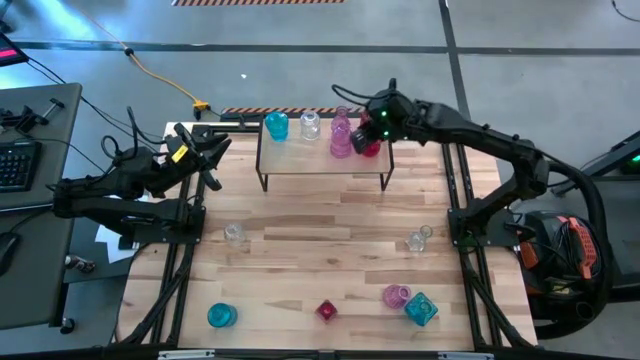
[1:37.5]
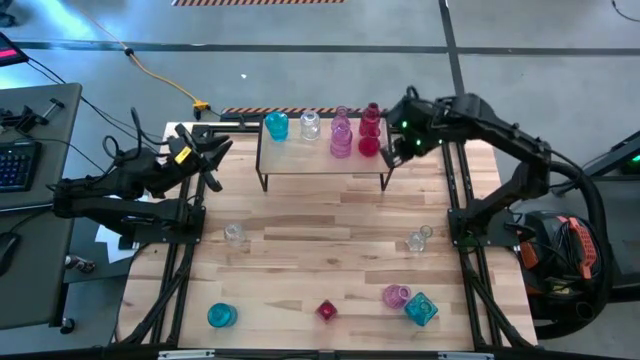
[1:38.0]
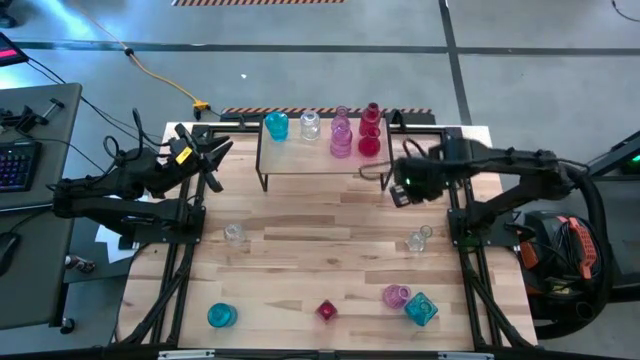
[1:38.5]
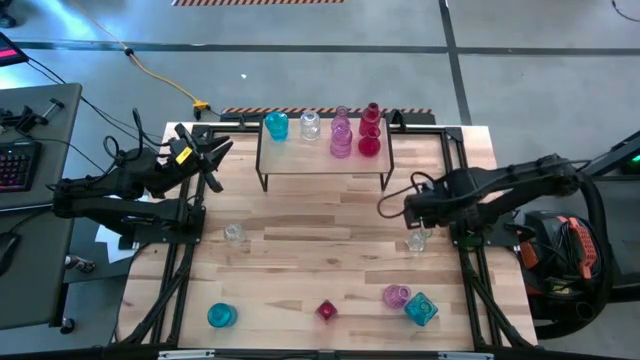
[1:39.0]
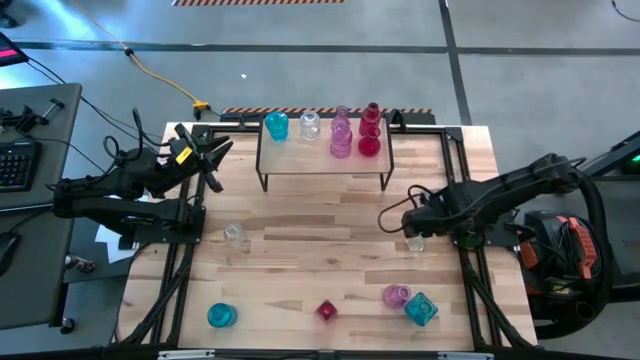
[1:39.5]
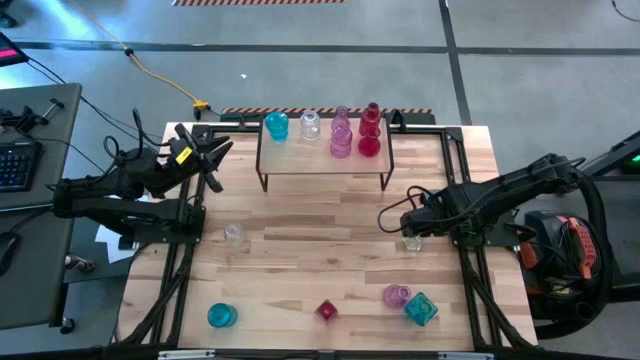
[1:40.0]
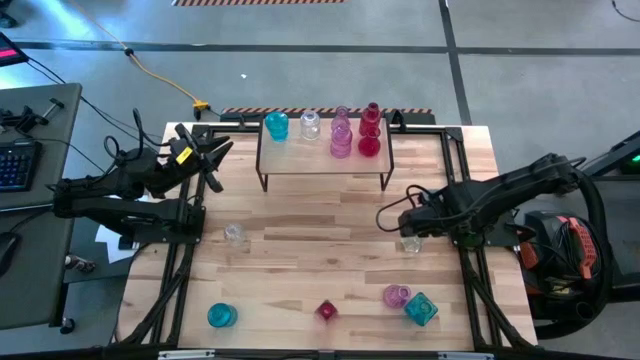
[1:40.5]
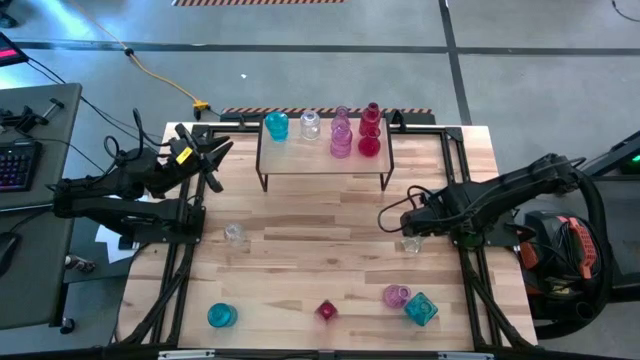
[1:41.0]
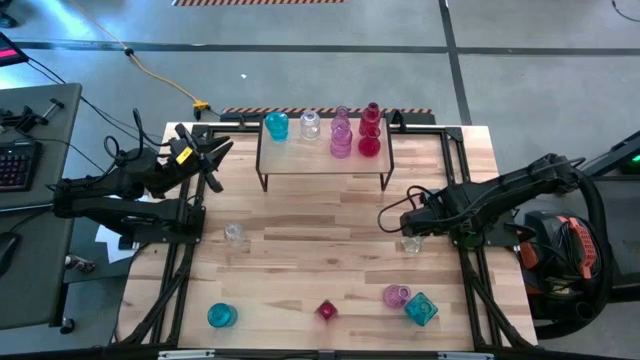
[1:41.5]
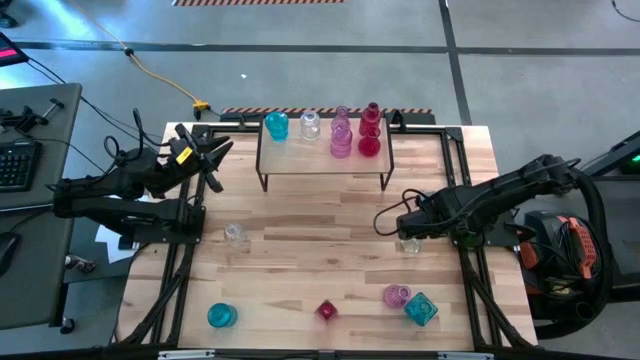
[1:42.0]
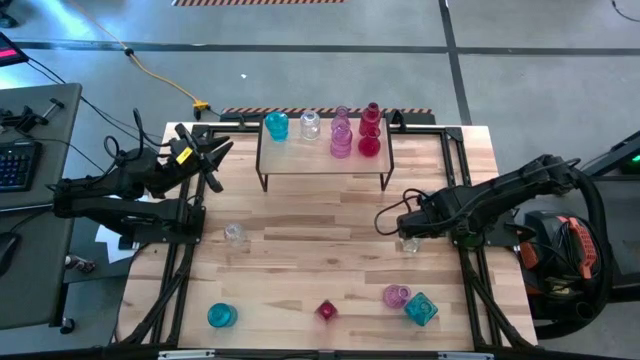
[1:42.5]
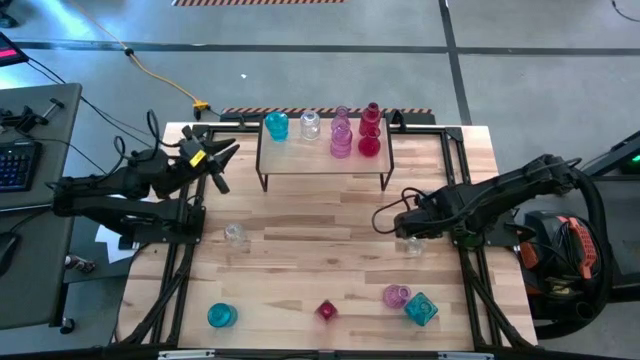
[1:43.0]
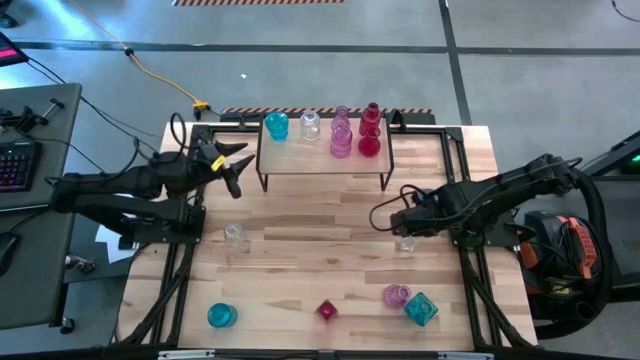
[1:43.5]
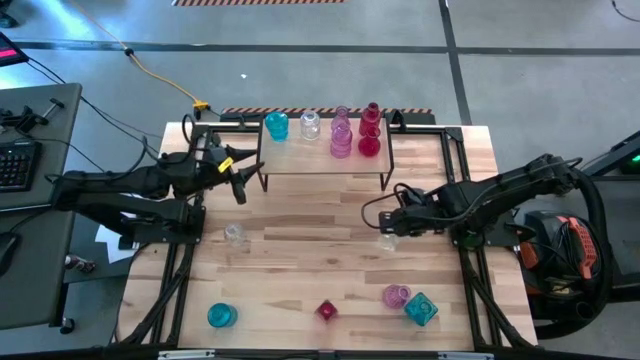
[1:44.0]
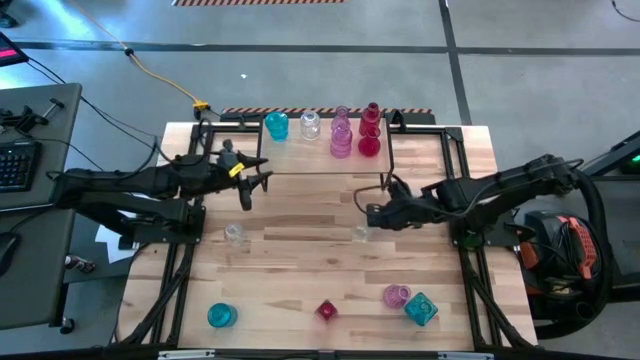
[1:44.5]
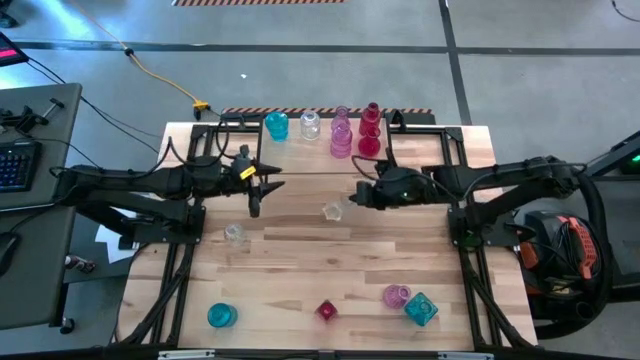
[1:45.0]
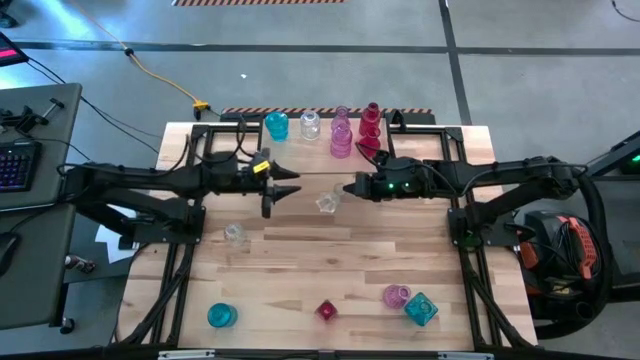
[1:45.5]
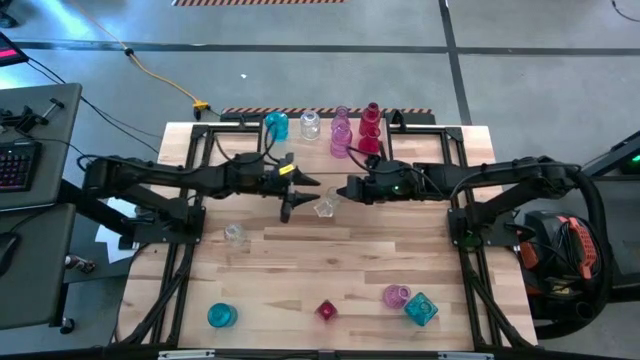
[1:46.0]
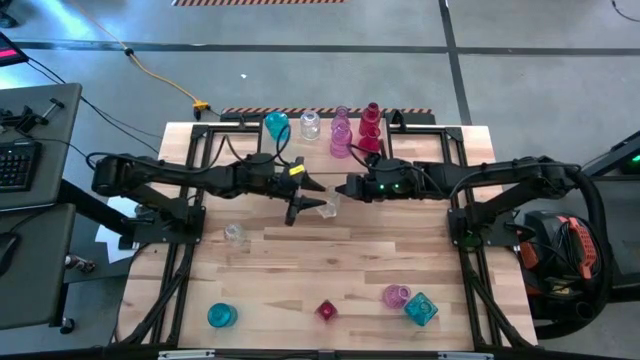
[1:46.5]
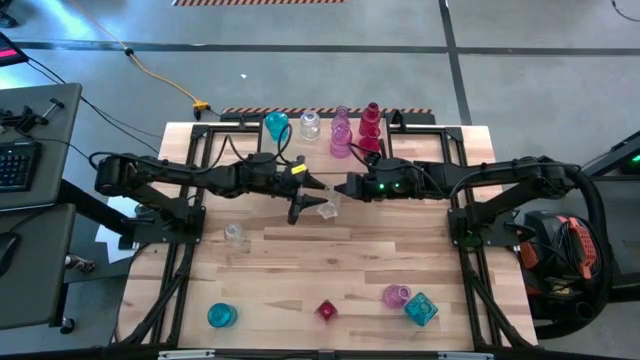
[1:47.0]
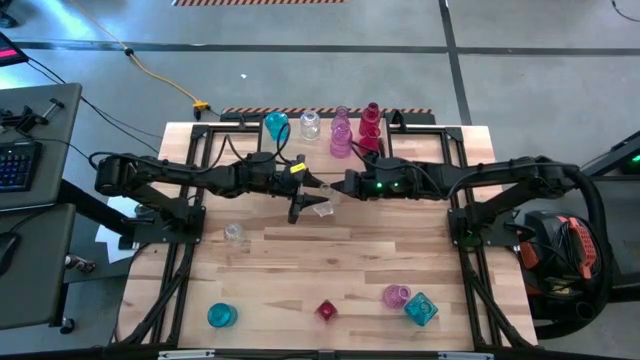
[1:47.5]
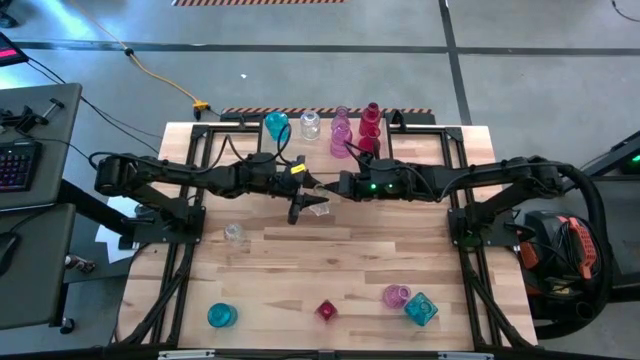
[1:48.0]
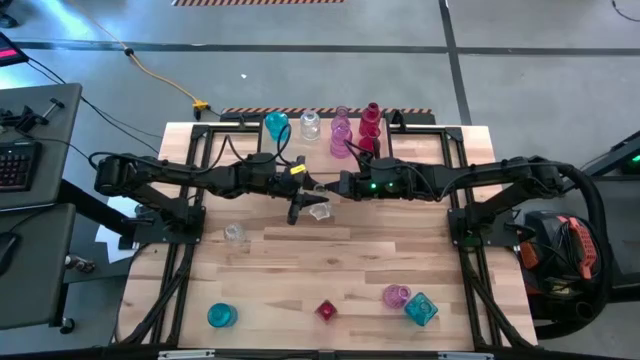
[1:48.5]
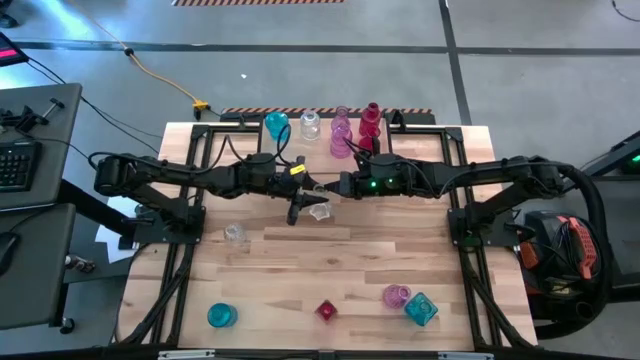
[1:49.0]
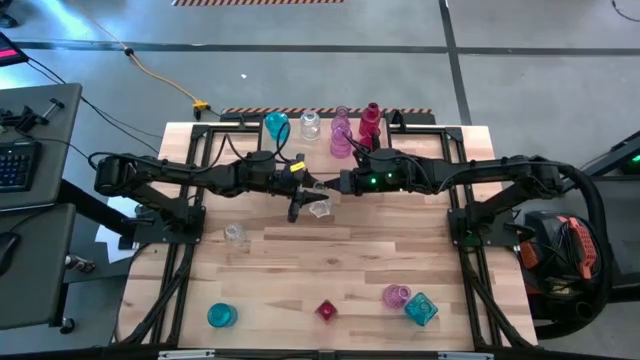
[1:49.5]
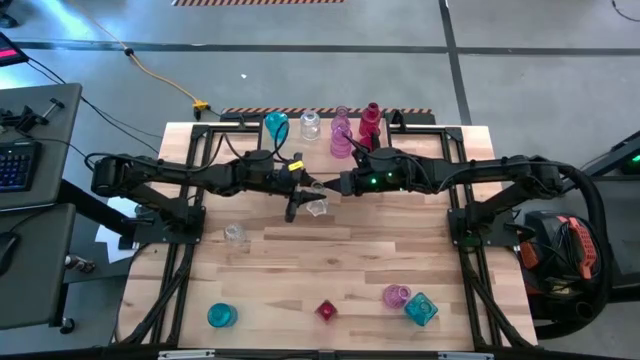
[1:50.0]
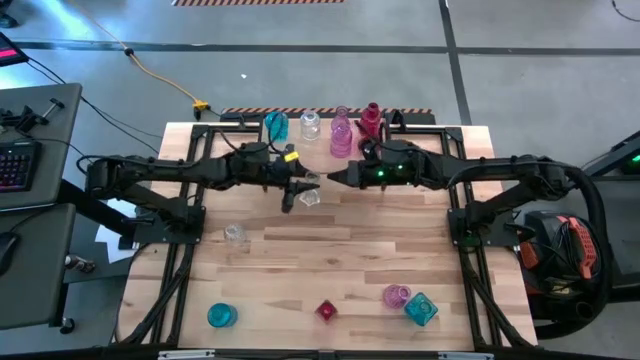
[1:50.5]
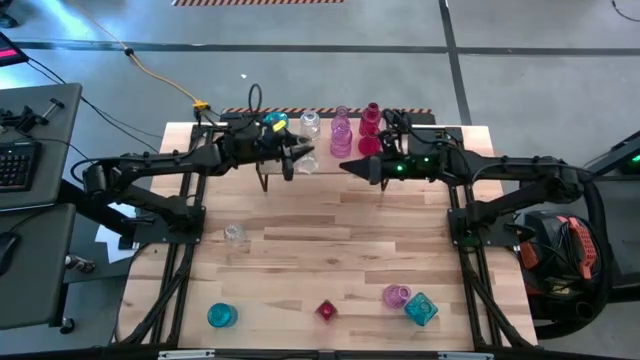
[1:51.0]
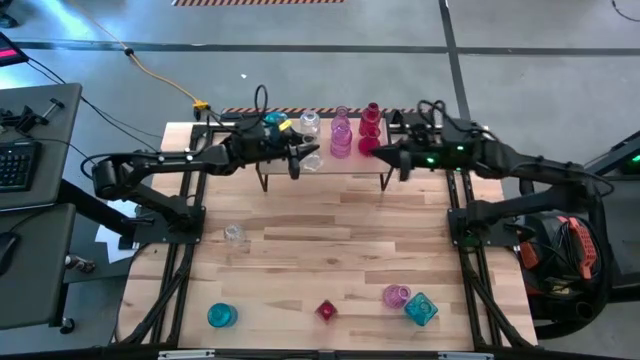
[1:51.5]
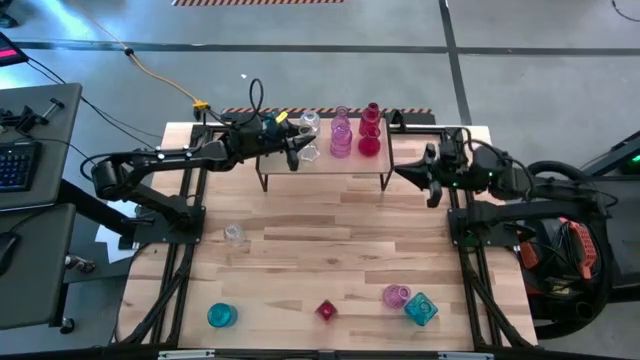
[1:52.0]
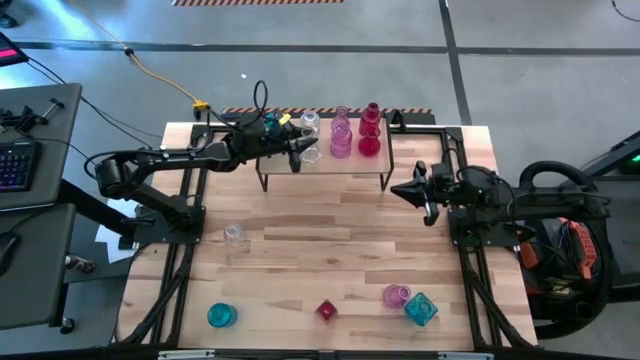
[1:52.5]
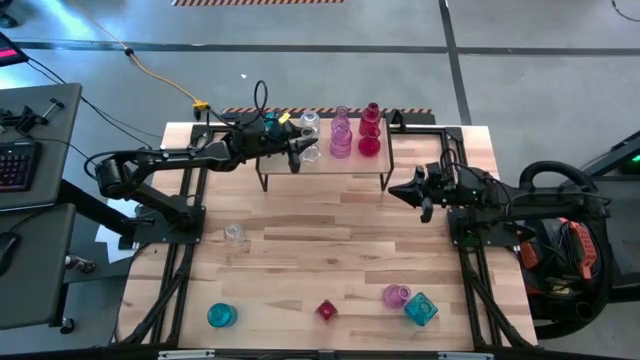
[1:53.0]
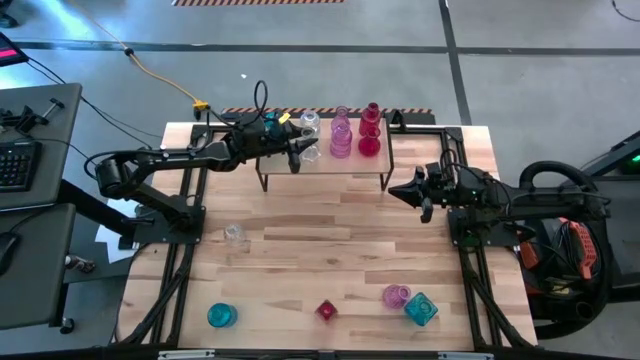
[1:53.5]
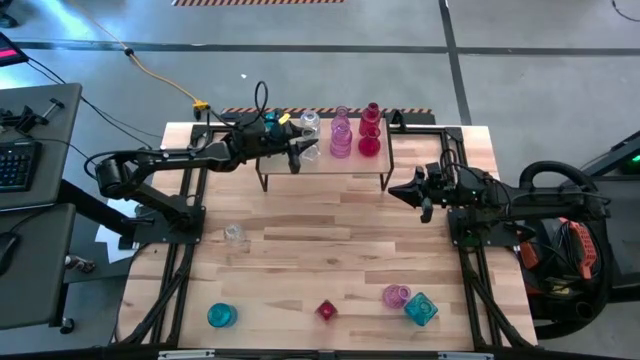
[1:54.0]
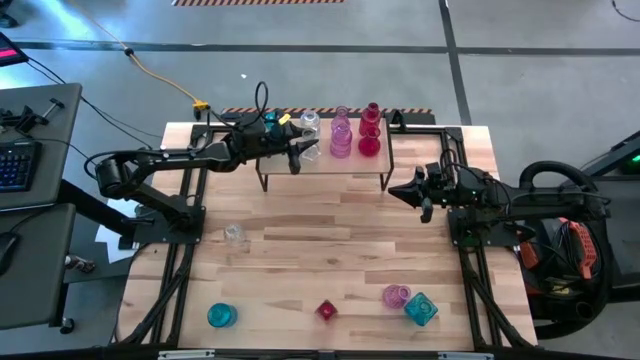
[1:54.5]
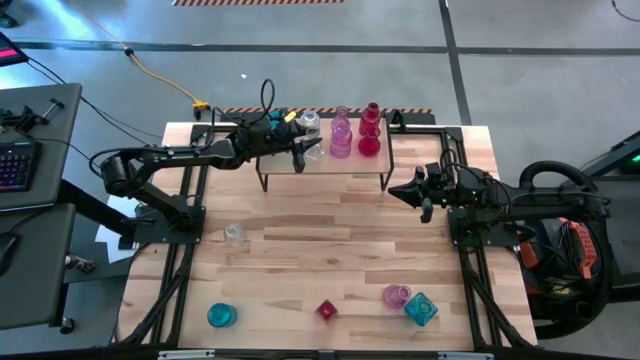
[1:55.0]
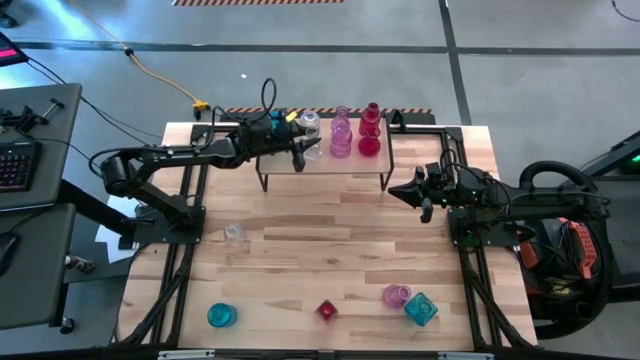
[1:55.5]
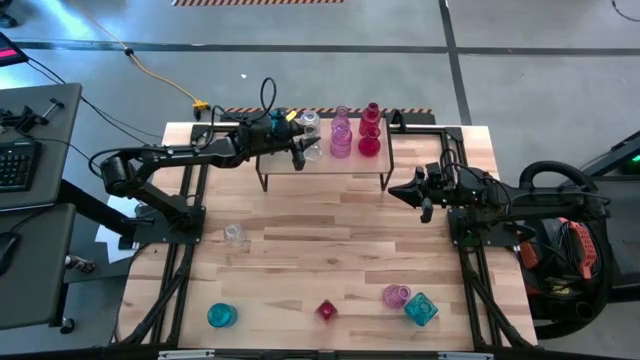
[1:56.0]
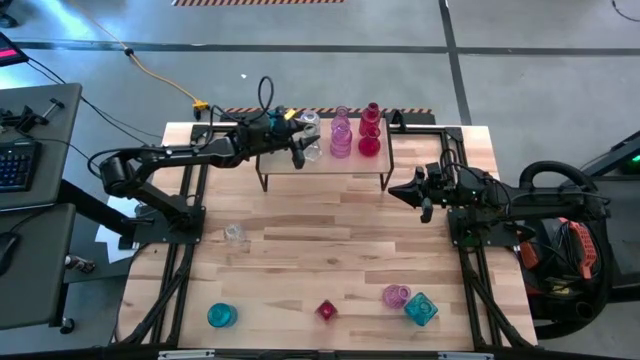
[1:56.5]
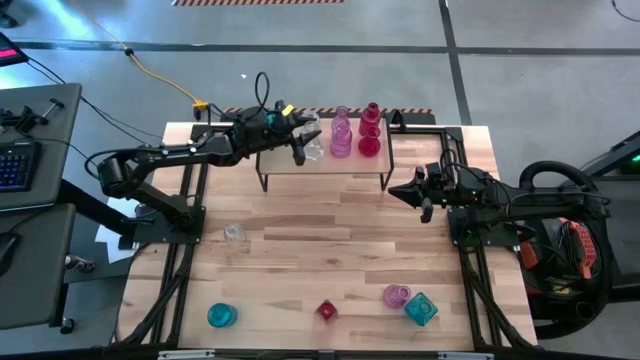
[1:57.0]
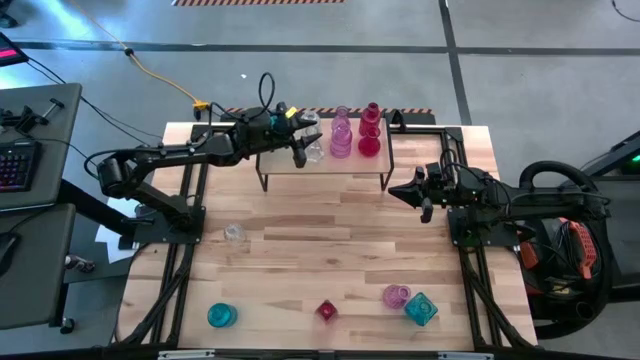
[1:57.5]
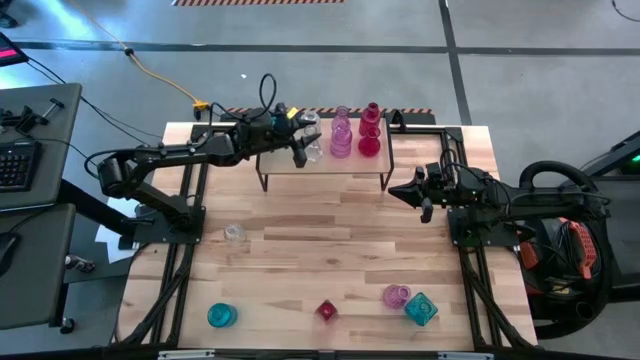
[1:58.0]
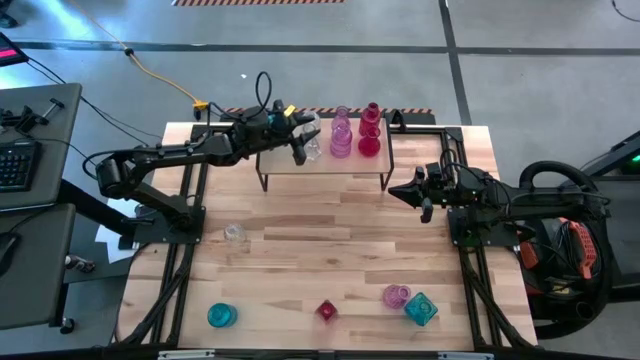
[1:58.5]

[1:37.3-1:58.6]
Task: sort vases onto shelf
Put the right transparent vase on the shelf aligned with the other transparent vase

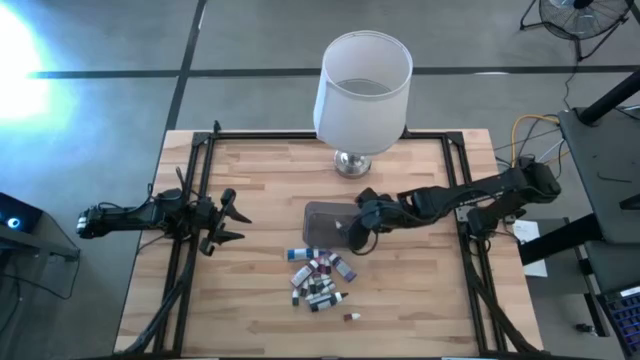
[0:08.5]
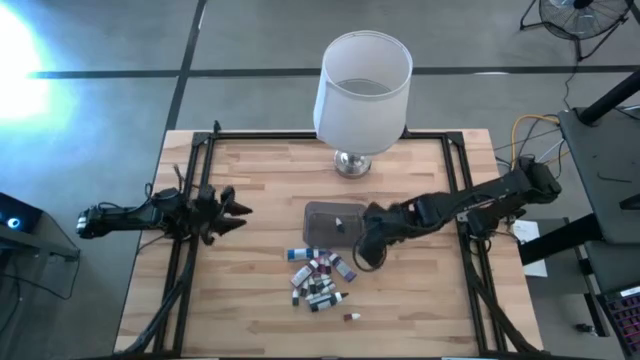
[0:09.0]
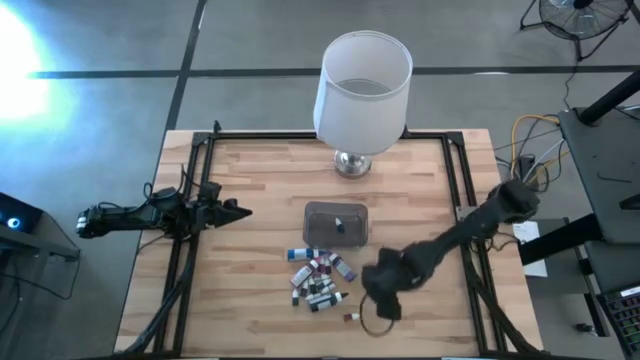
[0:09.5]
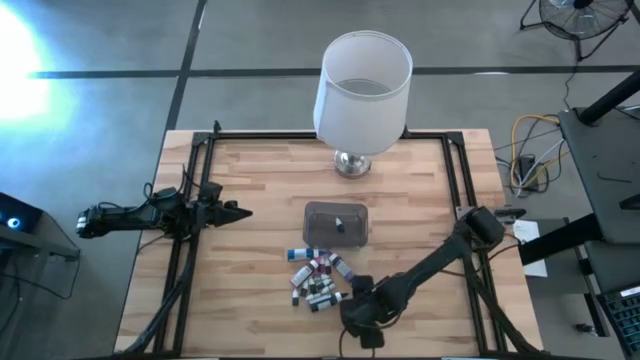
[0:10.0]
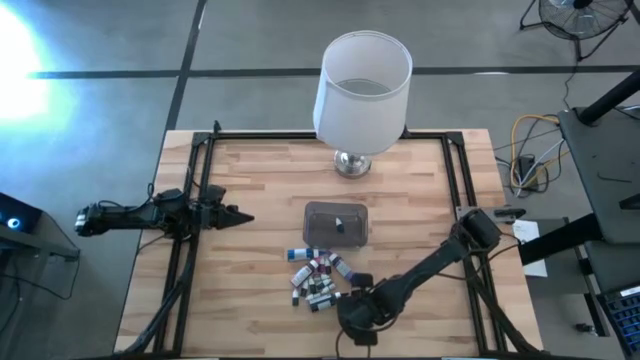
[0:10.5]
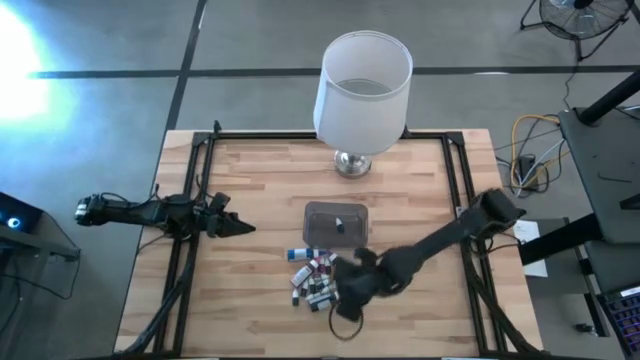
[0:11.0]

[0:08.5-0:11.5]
Task: Pick & Place food coloring
Put the small orange food coloring into the black bin
